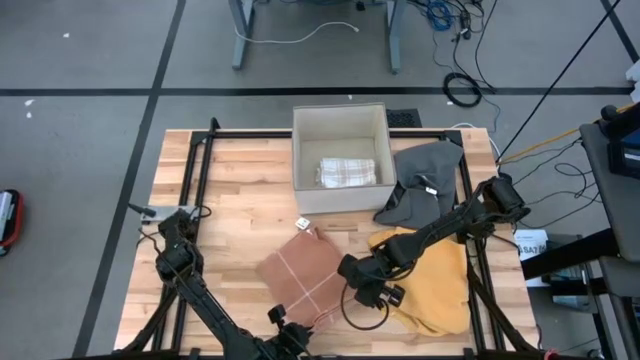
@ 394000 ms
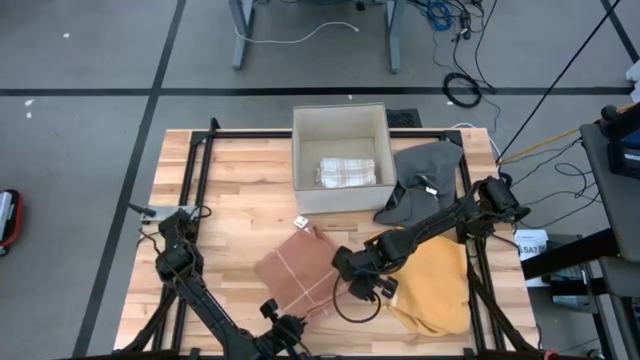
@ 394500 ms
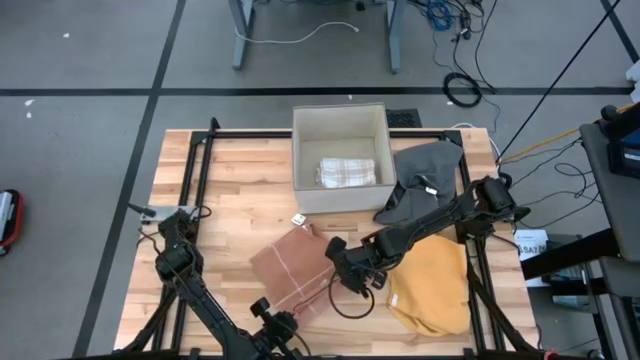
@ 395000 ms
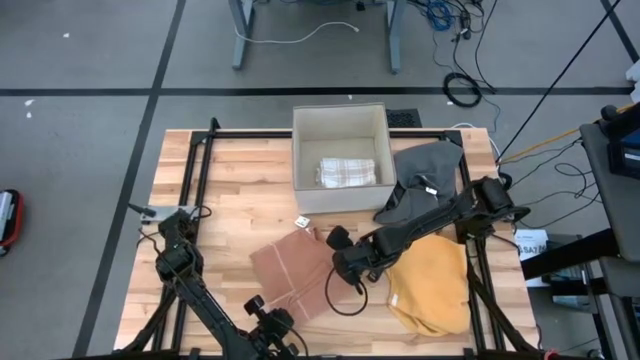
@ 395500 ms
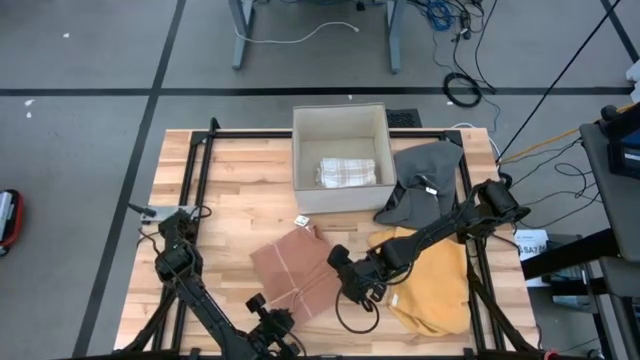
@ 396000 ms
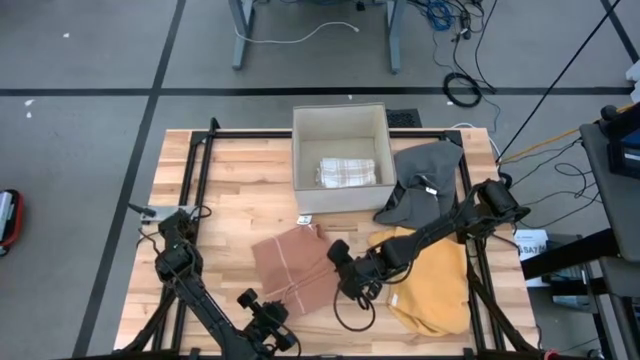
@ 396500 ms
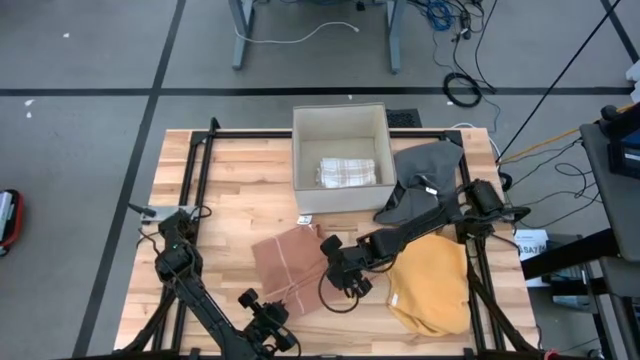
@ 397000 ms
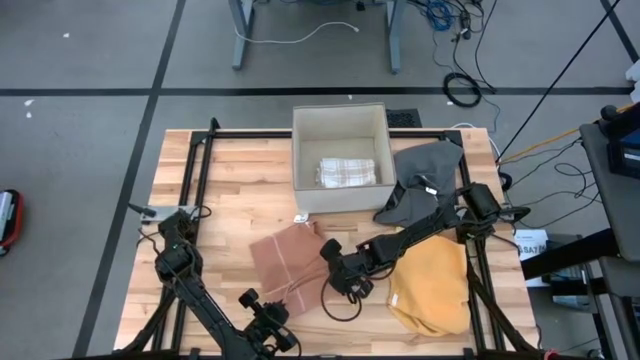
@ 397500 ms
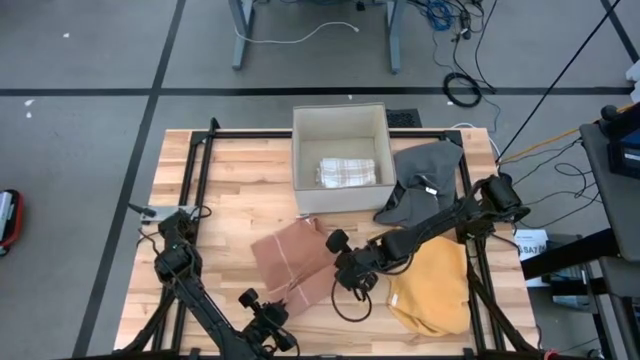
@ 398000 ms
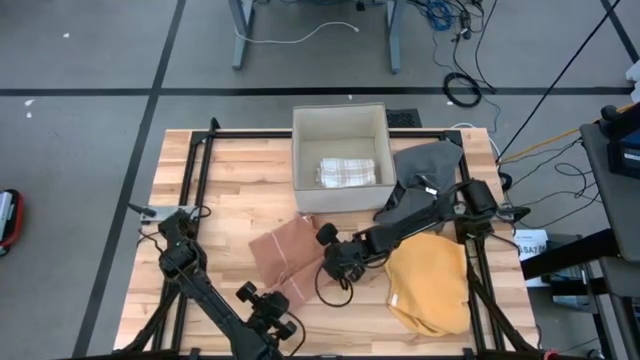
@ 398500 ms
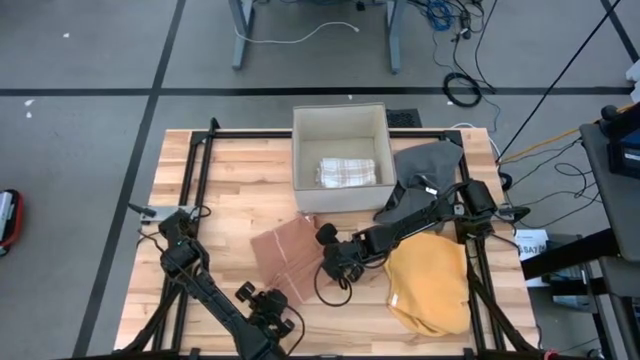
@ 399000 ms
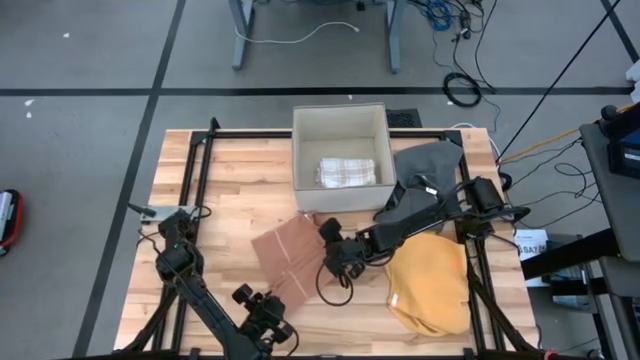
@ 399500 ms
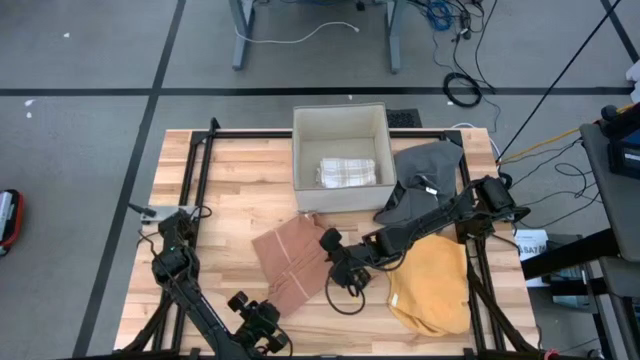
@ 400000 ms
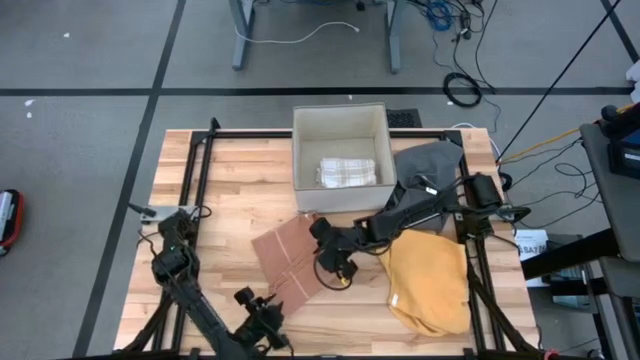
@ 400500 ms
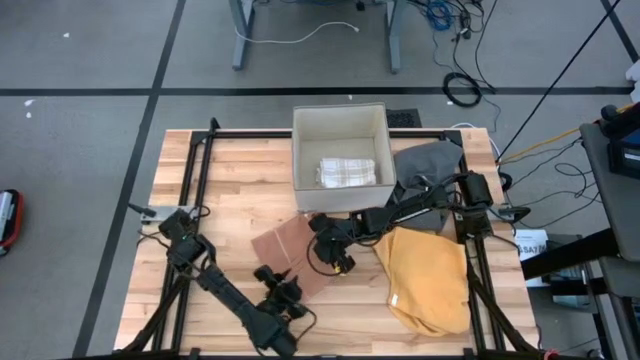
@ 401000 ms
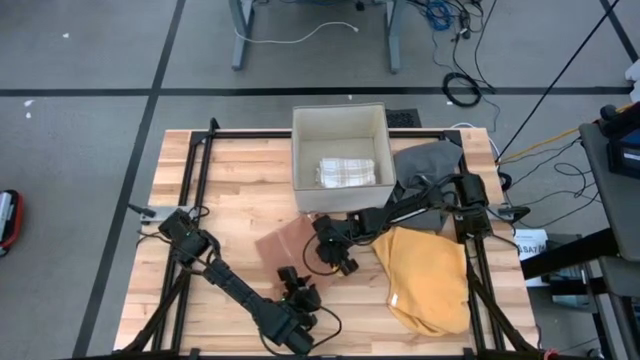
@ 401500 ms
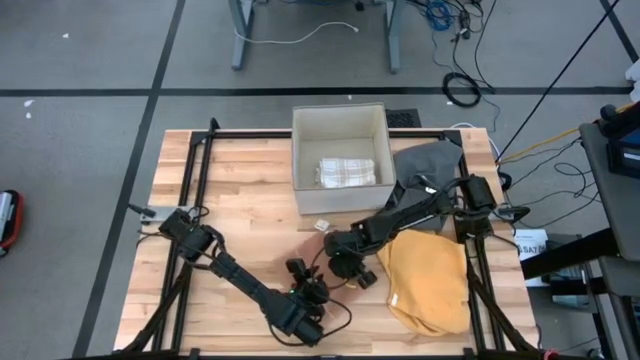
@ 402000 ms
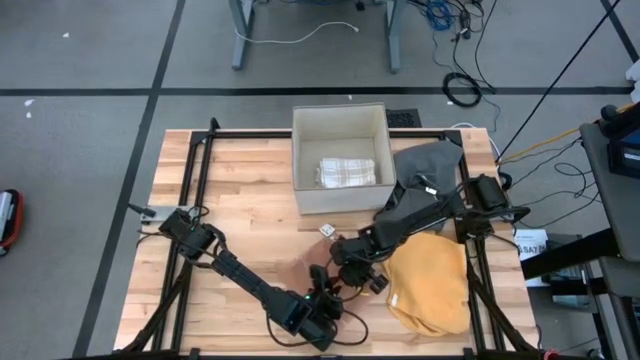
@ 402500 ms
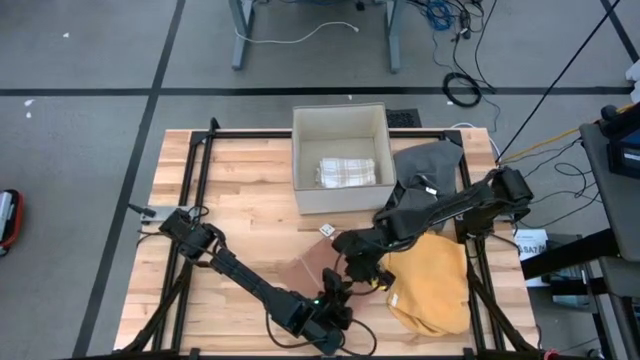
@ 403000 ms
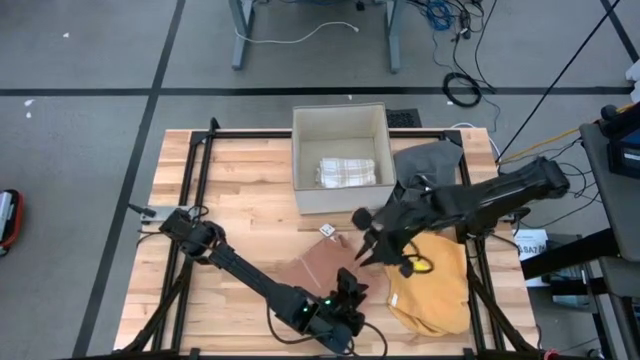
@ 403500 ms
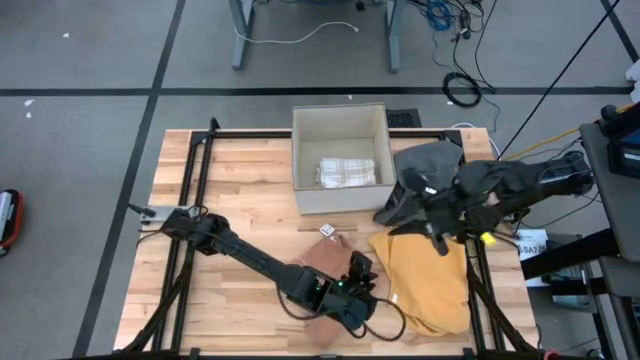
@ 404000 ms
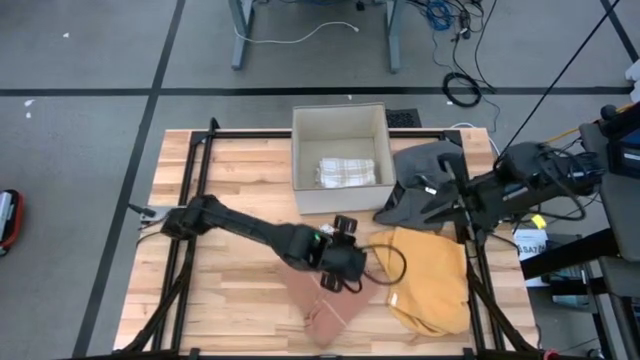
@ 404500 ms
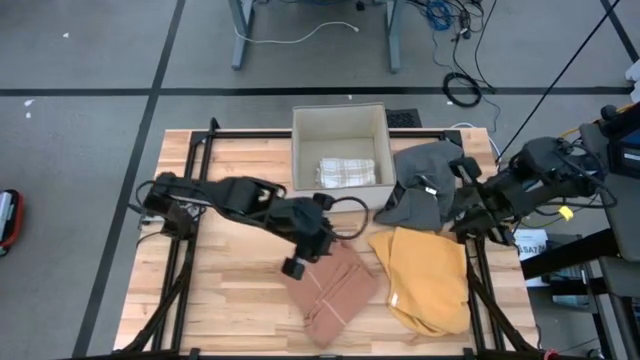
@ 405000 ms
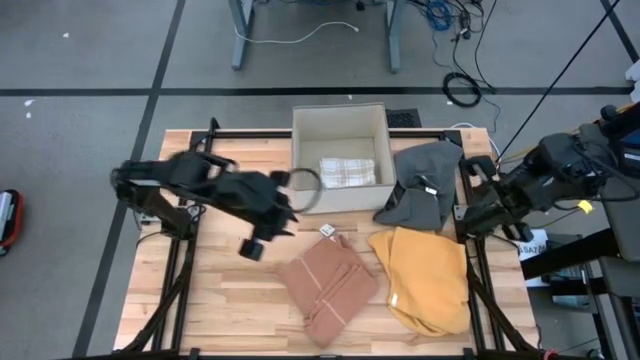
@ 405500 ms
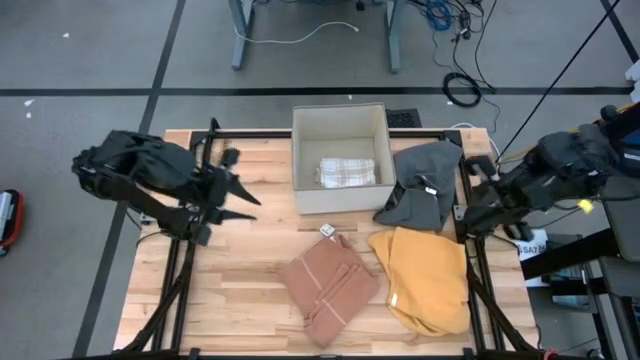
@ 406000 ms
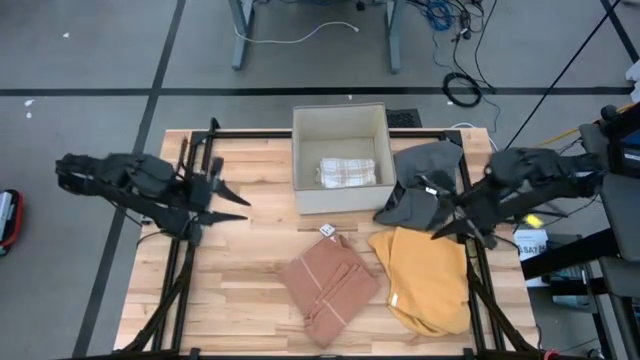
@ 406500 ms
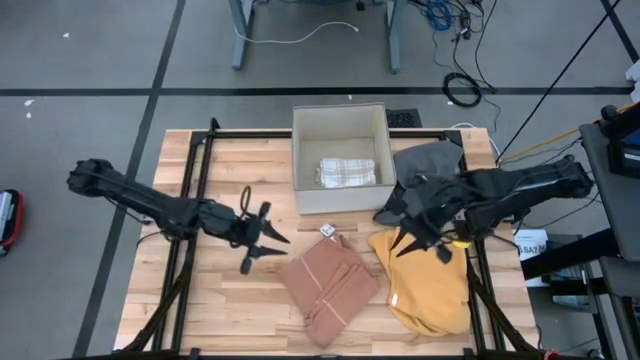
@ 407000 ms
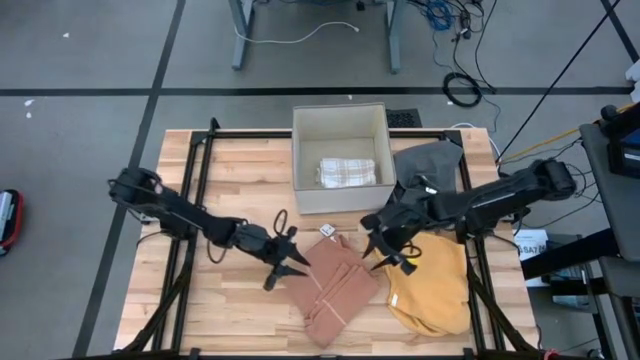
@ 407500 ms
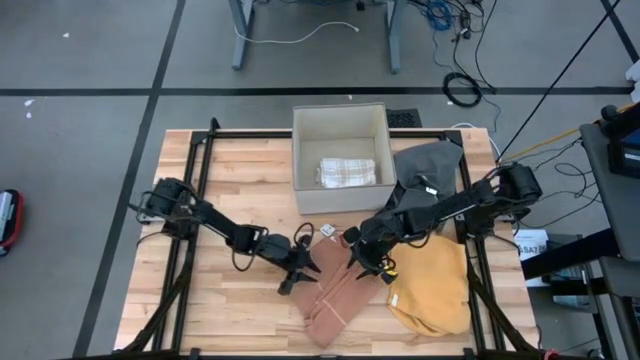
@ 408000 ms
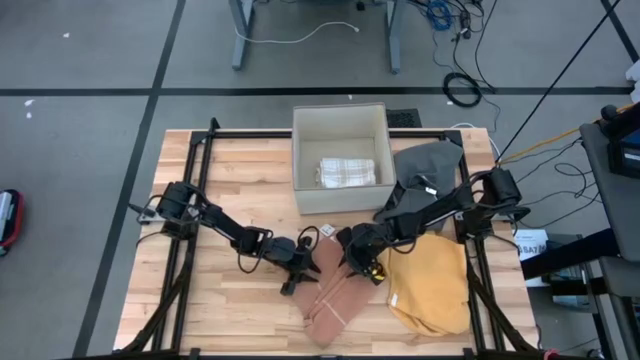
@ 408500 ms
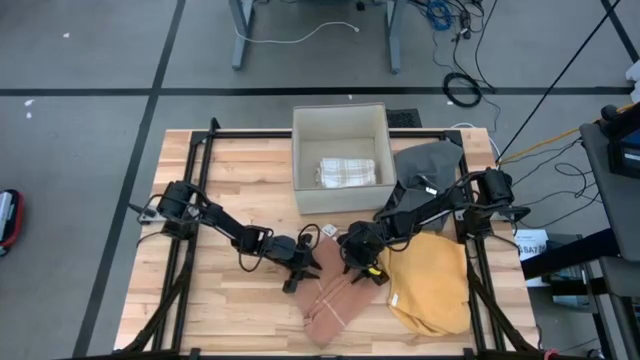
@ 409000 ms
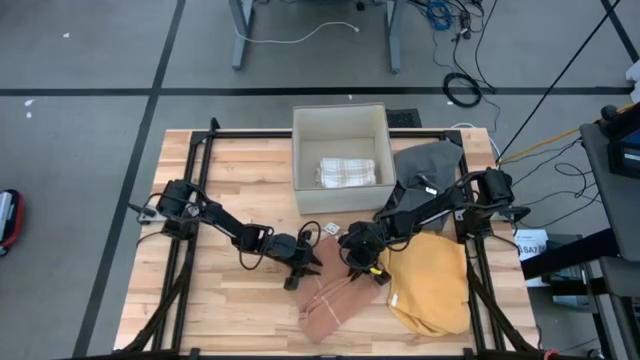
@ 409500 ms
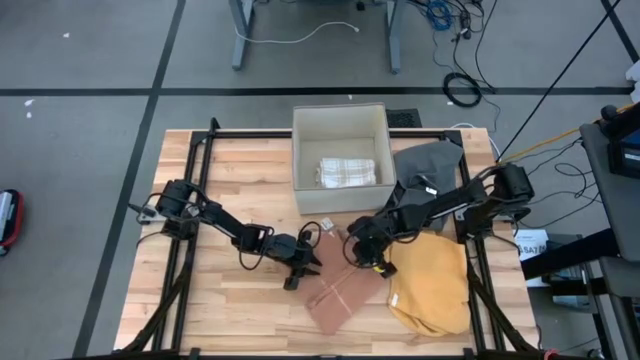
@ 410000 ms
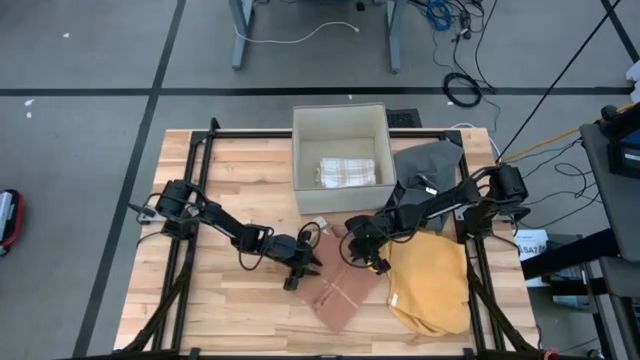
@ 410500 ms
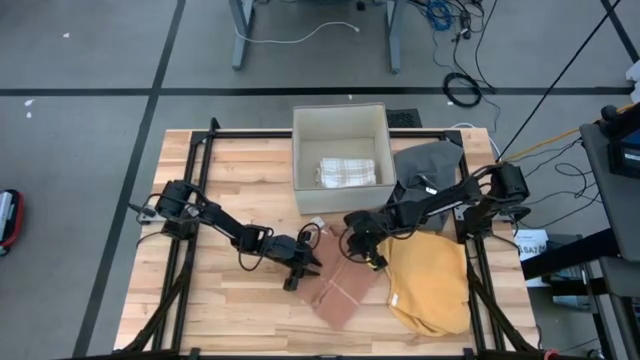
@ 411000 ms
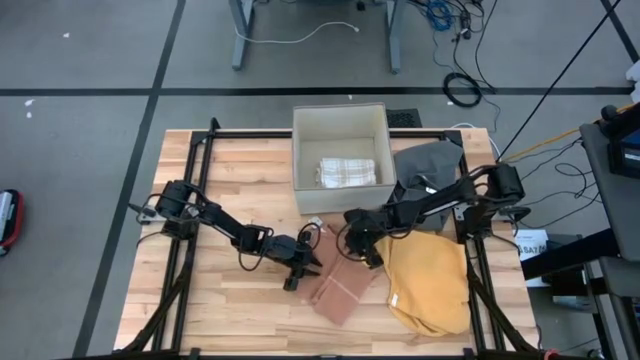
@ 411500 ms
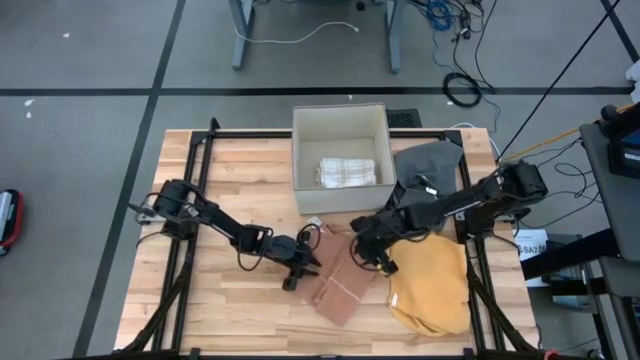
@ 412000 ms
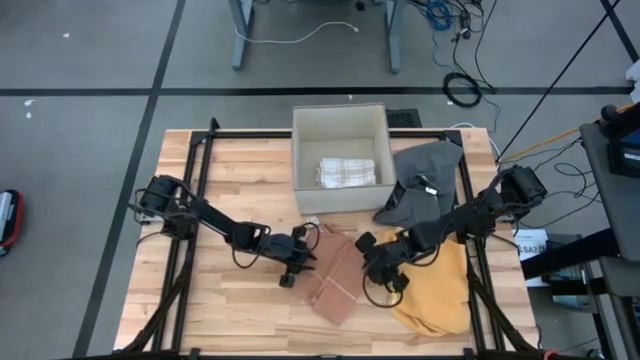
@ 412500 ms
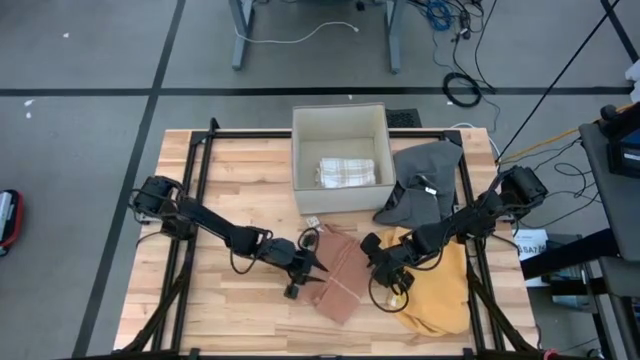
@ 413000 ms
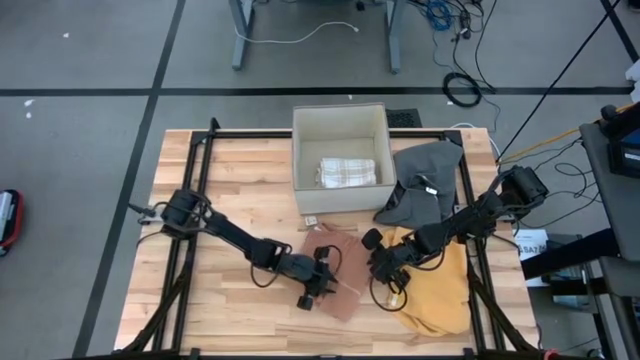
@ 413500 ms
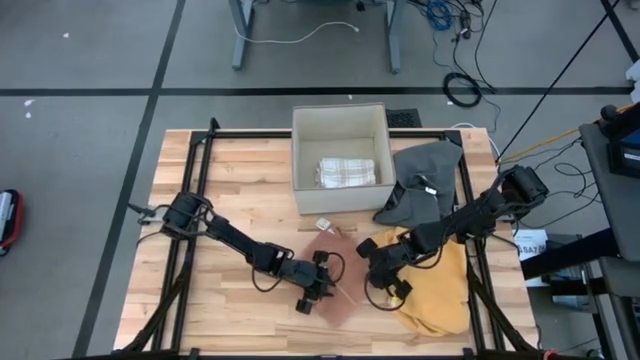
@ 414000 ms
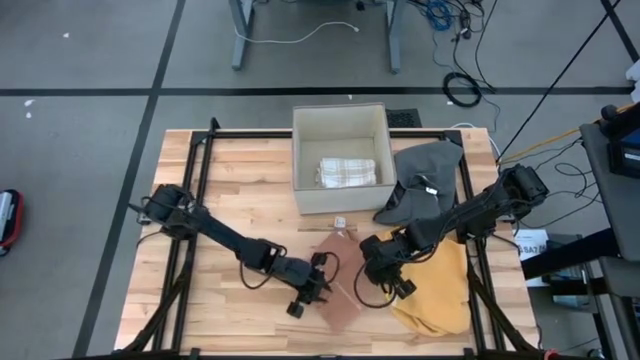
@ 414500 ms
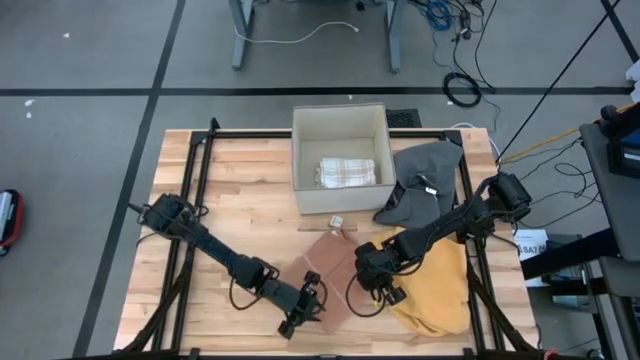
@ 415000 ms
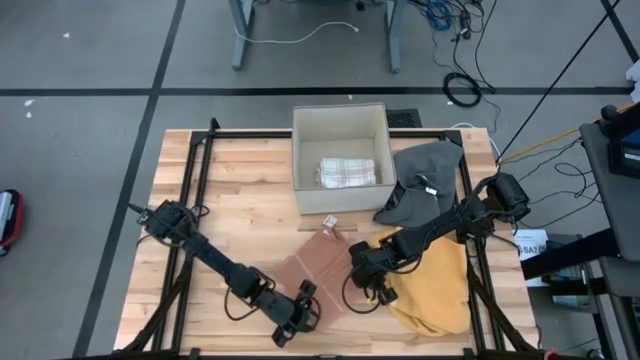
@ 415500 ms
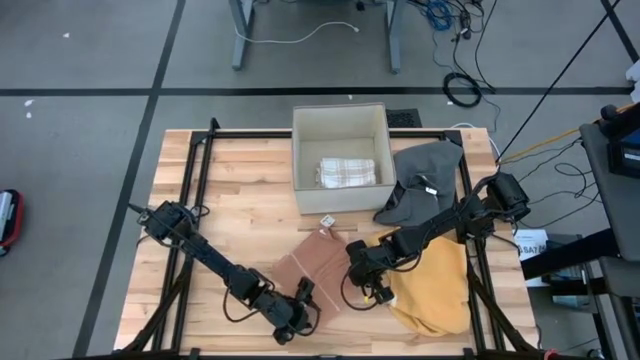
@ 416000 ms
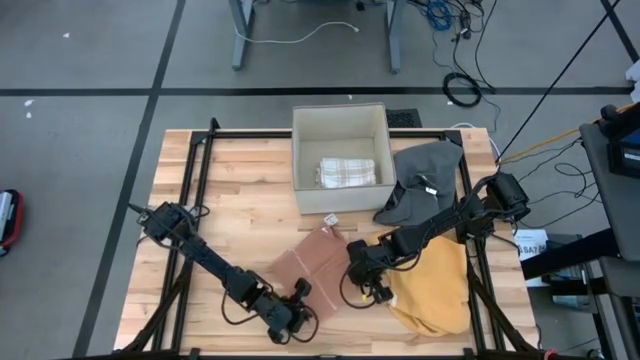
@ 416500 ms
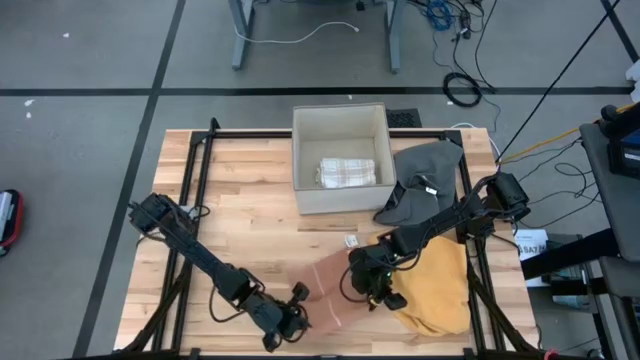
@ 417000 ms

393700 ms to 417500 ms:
Task: Fold towel
Fold the light brown towel
